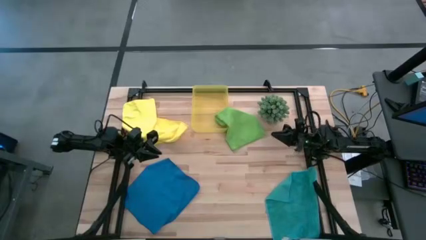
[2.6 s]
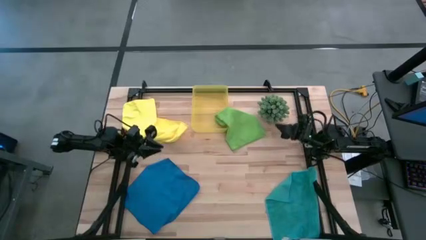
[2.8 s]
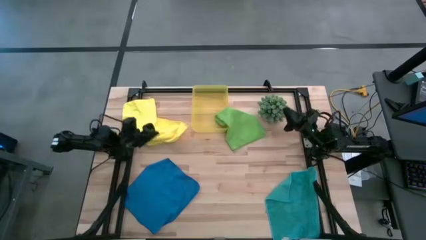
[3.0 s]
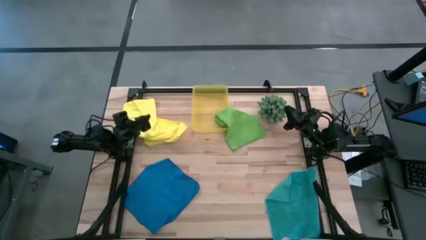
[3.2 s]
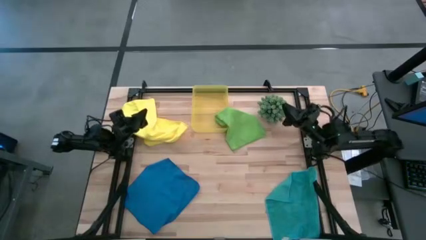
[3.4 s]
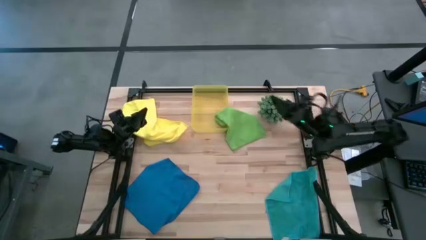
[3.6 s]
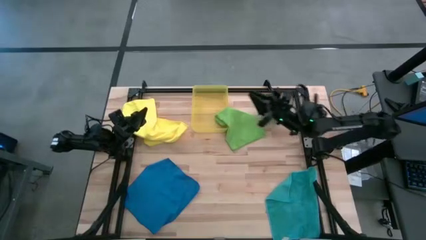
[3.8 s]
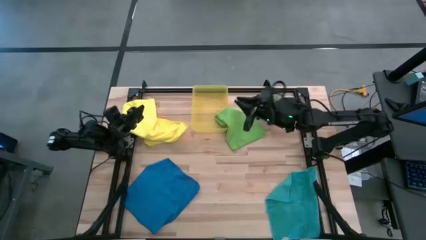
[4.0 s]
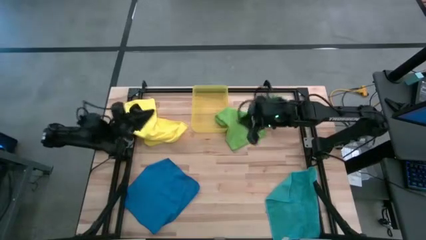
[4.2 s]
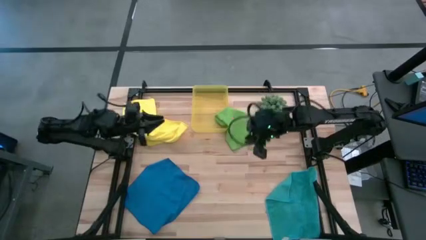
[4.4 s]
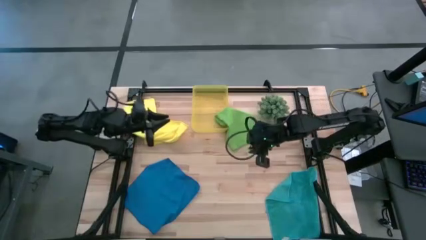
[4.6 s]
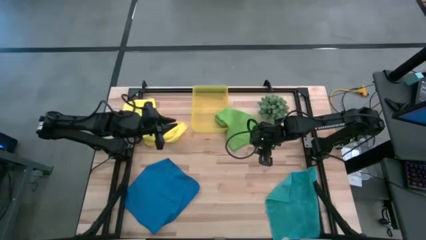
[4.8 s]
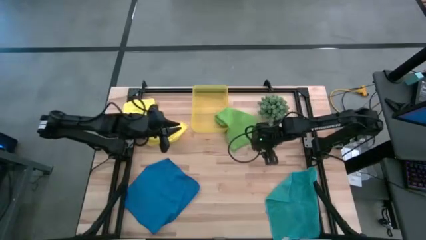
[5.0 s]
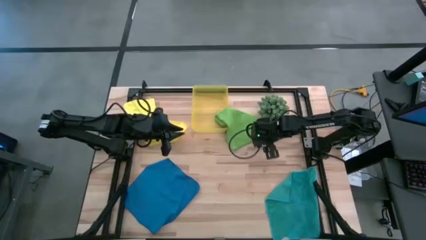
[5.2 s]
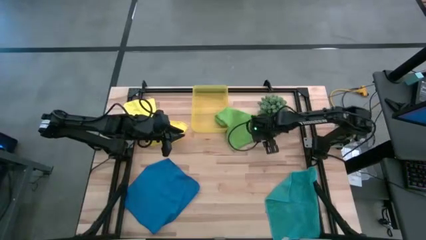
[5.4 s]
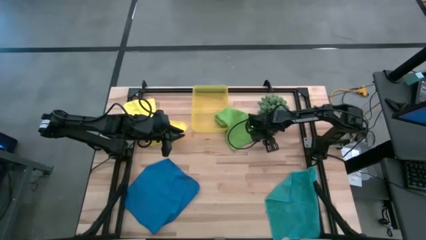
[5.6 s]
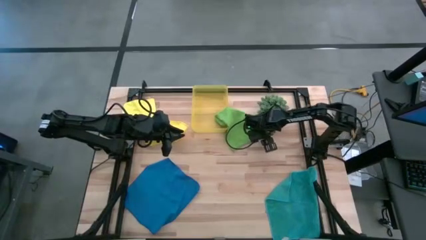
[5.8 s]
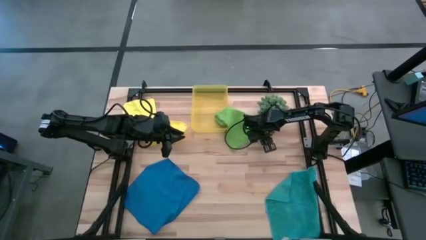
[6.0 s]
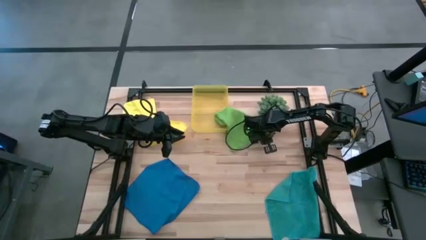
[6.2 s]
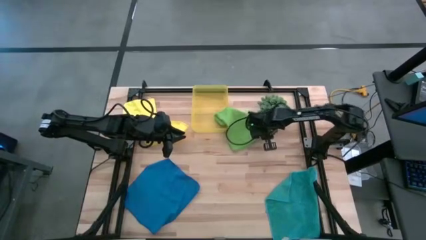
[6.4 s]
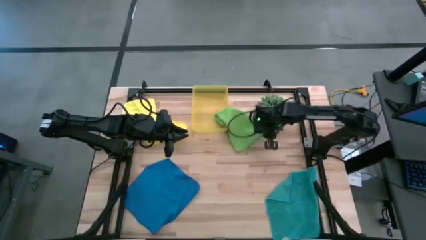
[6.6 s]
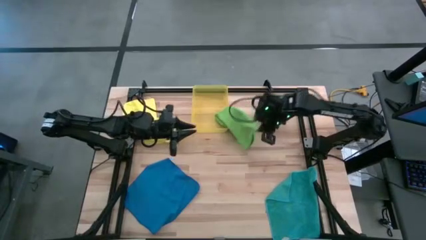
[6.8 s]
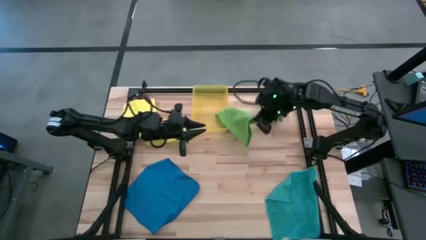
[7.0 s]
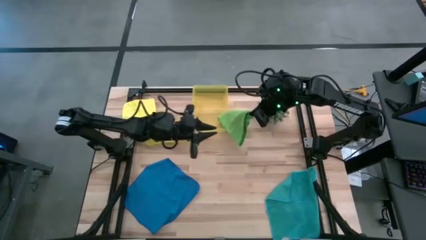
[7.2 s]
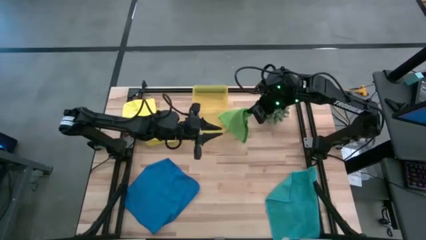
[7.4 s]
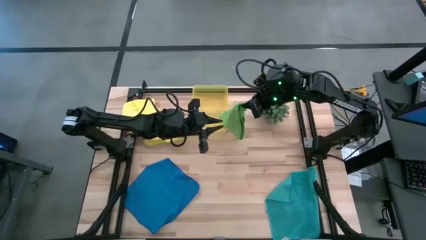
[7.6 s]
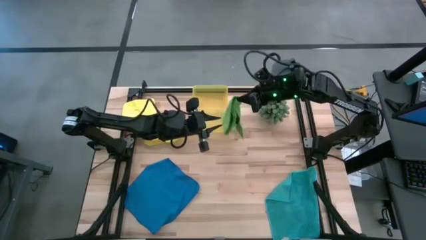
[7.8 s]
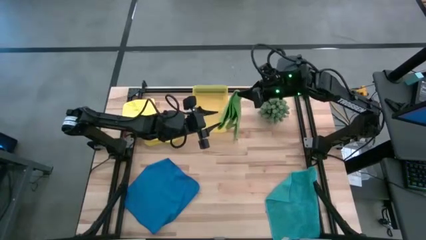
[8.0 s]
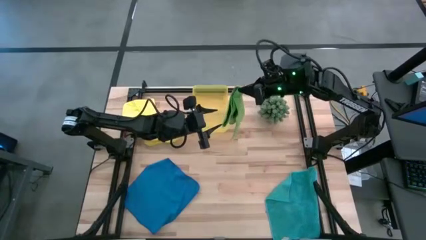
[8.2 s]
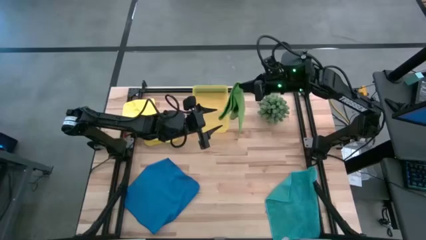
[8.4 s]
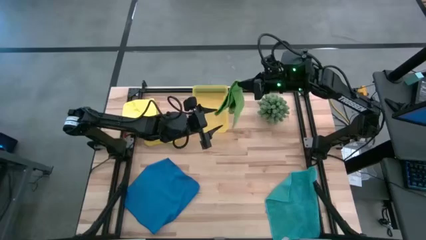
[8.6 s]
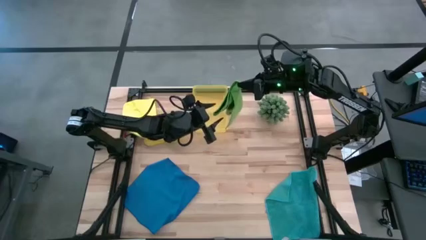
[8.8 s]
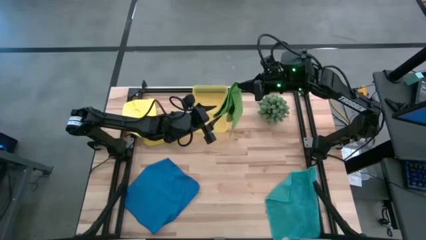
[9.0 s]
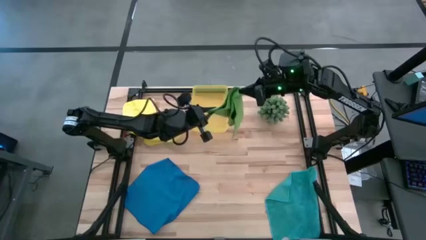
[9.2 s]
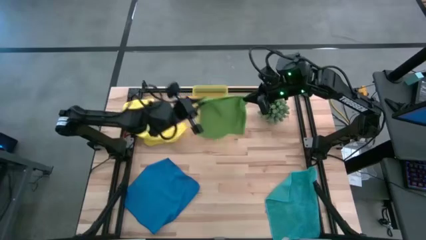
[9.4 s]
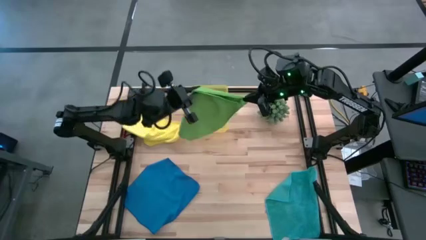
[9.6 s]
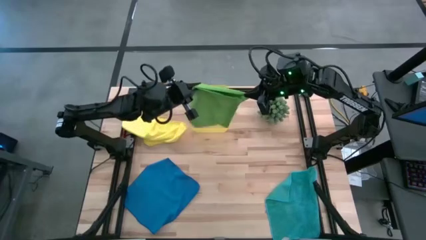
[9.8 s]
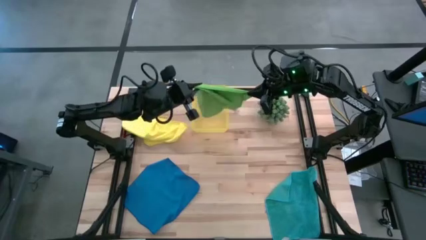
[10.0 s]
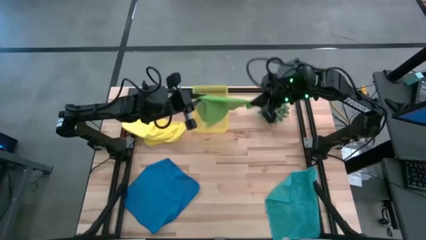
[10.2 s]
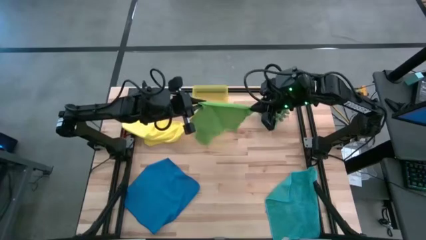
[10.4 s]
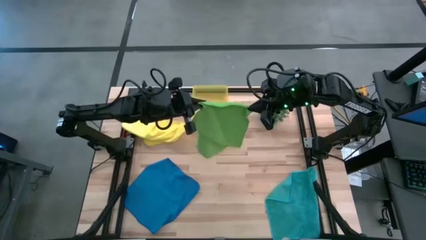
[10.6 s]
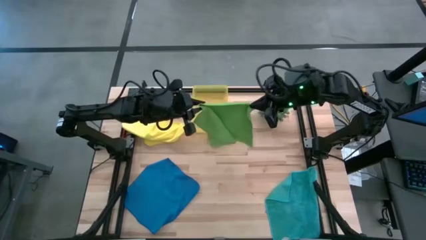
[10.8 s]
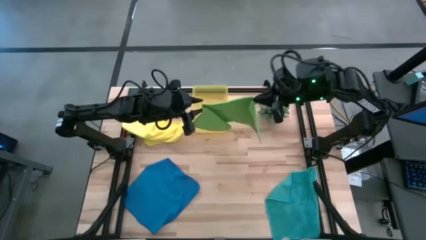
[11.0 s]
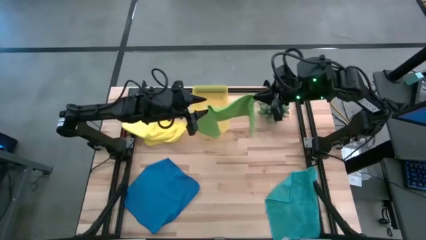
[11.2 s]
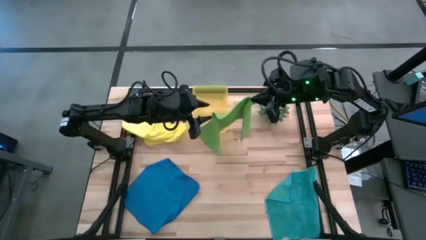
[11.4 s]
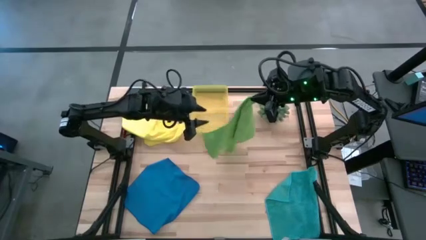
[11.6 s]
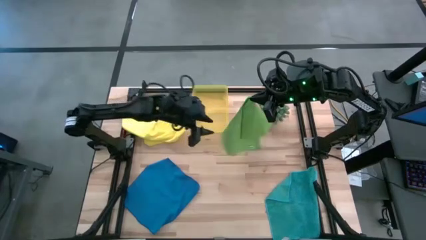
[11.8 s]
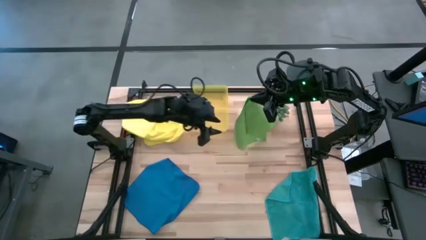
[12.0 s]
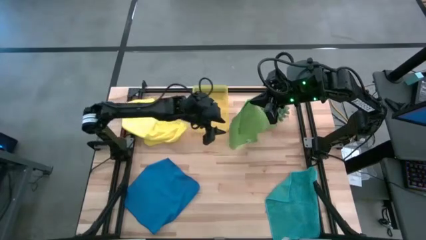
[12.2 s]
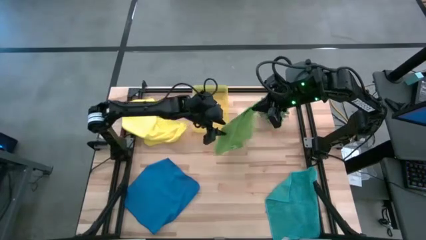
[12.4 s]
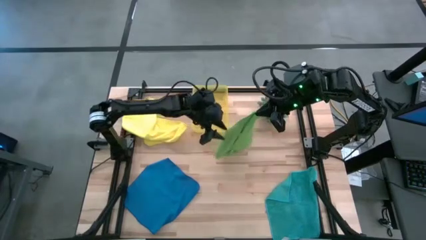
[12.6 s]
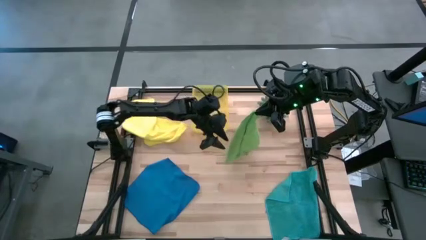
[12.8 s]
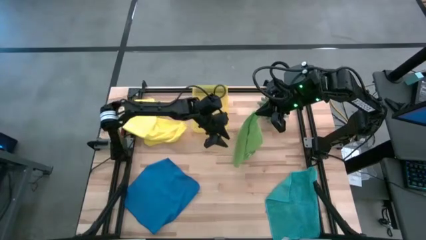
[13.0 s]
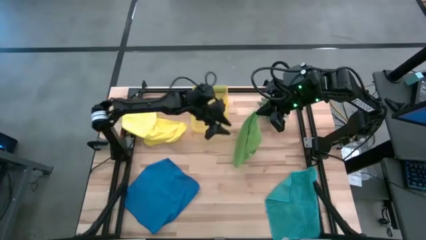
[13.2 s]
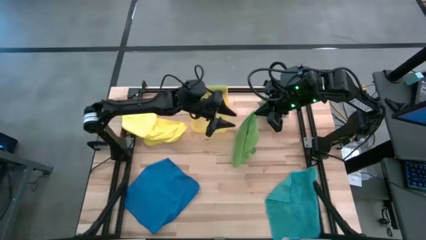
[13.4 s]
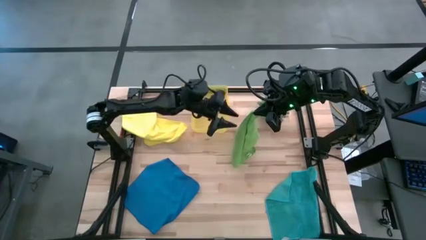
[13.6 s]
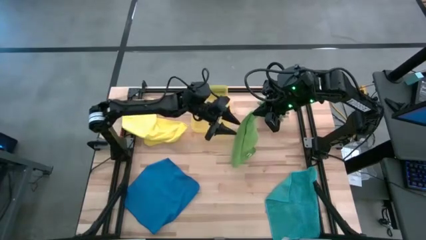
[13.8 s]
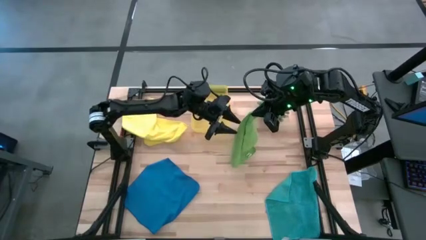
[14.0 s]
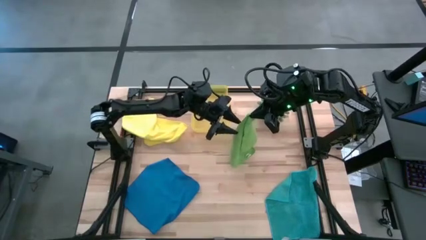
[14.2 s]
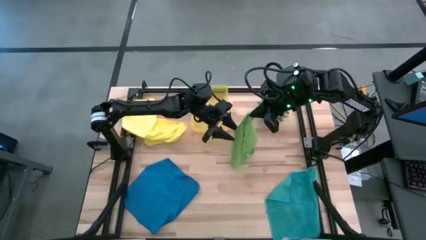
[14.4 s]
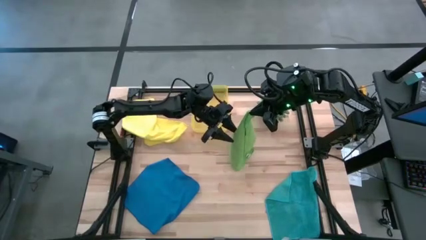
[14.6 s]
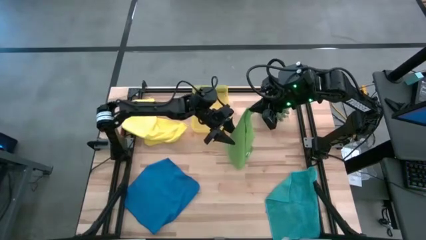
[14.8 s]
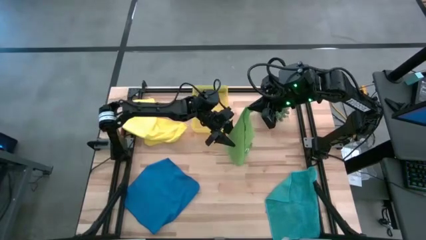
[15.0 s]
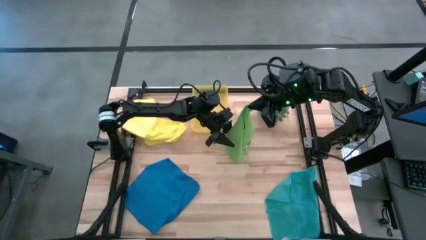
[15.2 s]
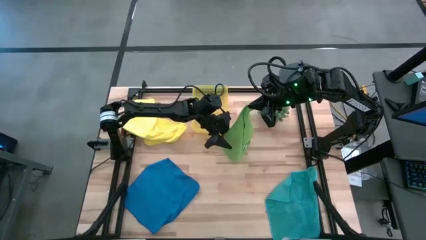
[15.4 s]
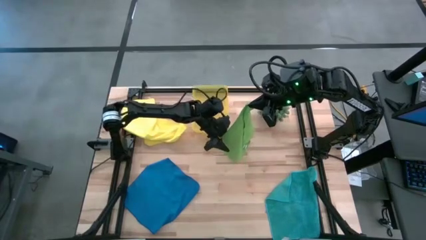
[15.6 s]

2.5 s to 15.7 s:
Task: Fold microfiber towels
Fold the green microfiber cloth

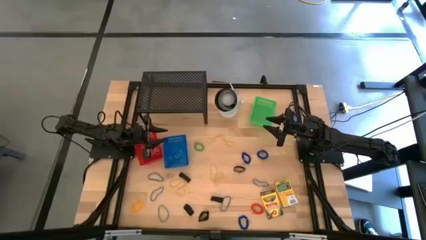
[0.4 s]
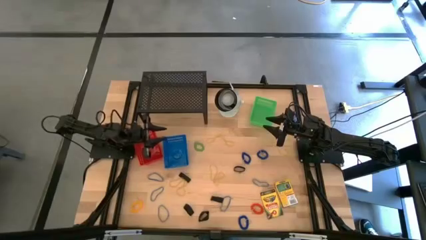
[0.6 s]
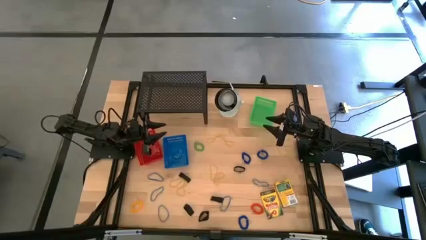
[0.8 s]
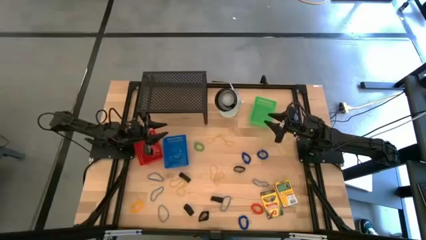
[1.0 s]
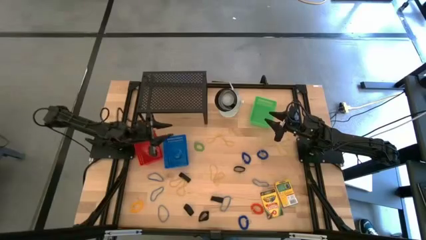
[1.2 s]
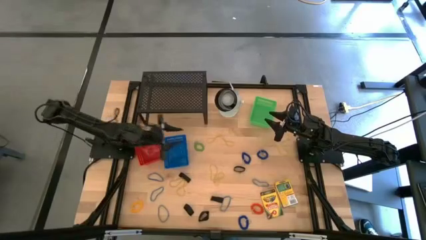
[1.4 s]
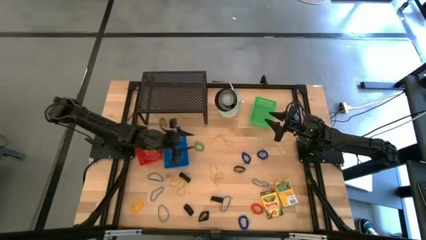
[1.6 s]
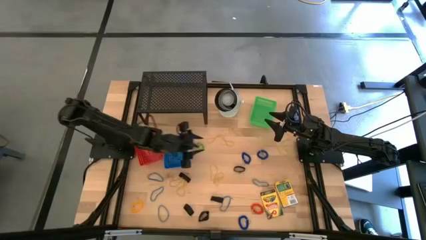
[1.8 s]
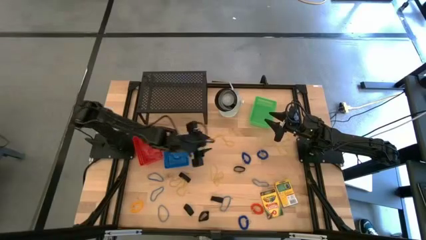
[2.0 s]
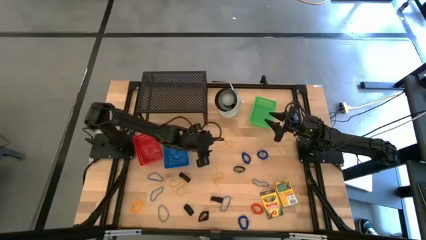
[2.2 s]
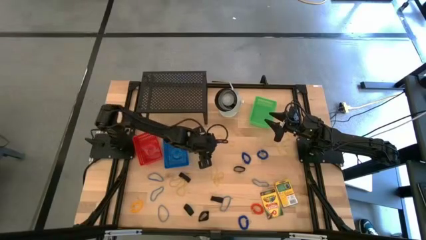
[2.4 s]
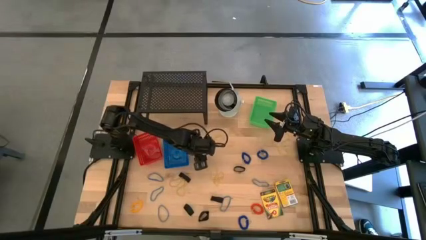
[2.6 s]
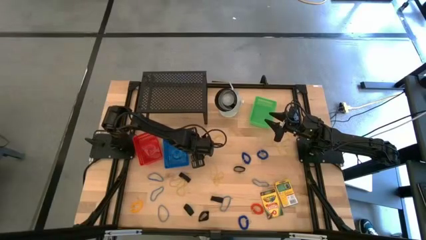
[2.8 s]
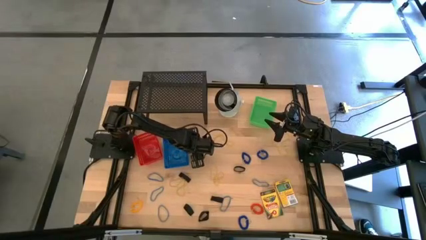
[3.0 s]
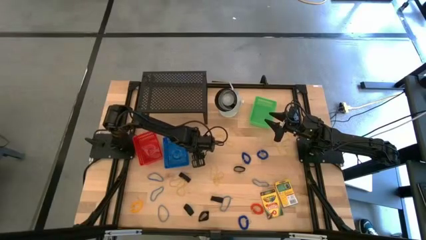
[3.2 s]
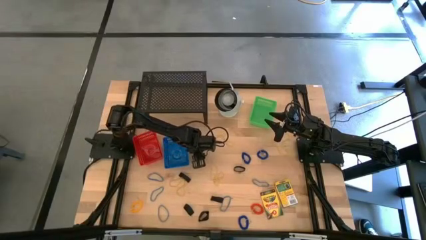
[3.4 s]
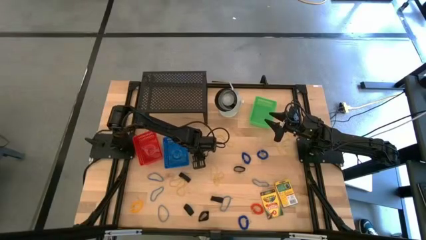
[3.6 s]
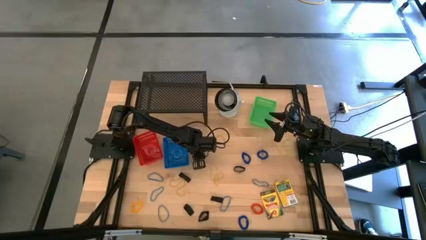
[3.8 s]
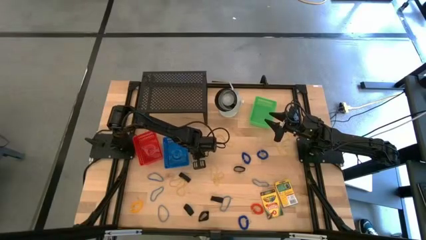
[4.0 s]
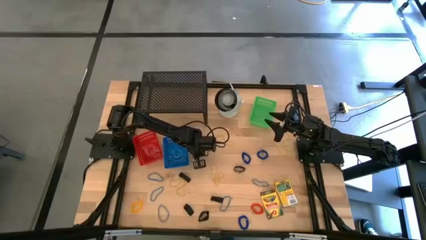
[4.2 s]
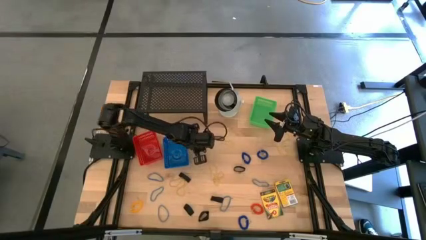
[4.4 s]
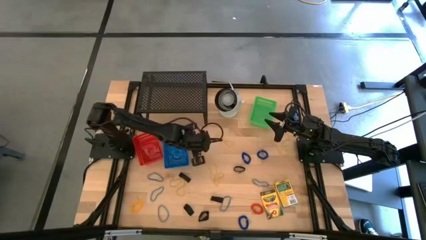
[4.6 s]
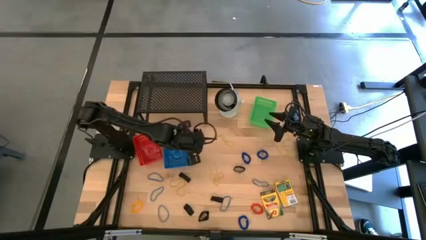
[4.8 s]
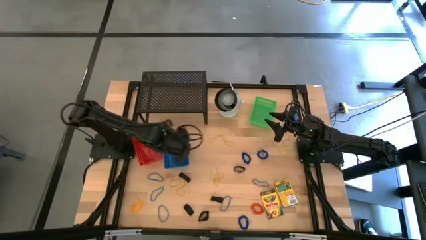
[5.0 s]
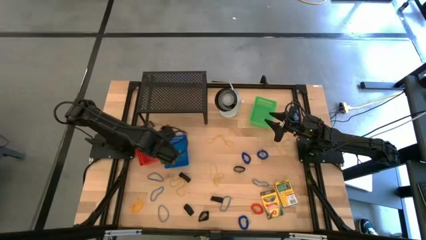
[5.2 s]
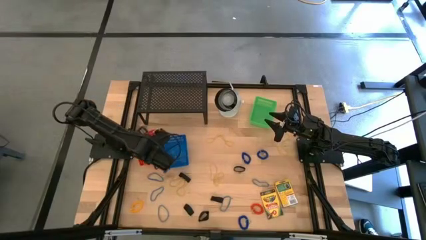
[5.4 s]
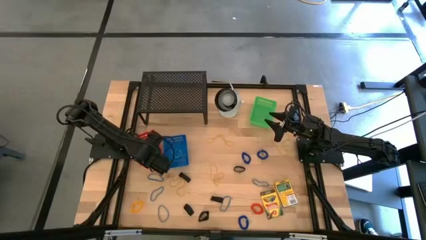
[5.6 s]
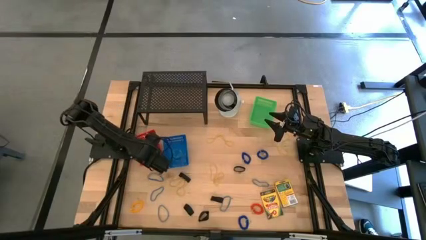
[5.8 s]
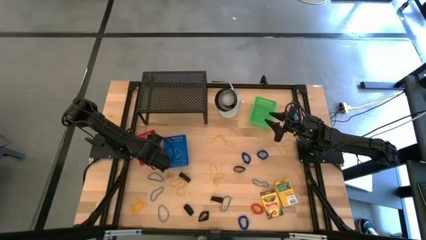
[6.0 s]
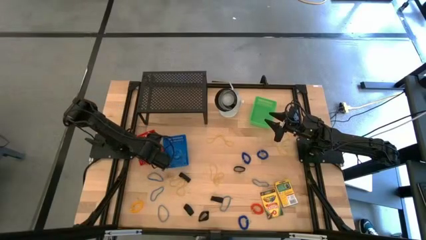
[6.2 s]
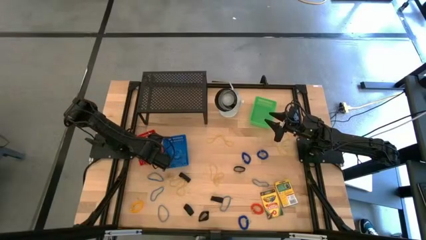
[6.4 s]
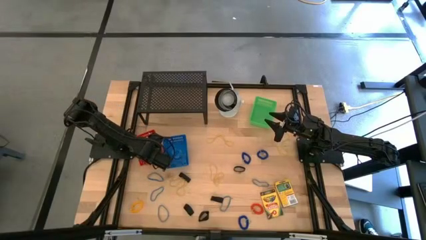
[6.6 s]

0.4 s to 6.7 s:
Task: Pick & Place Office Desk Supplies
Put the green spring keychain into the red bin
